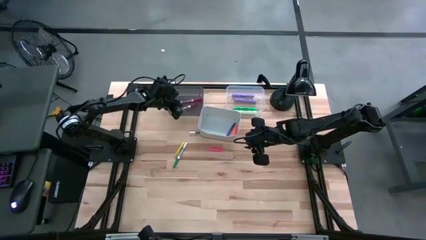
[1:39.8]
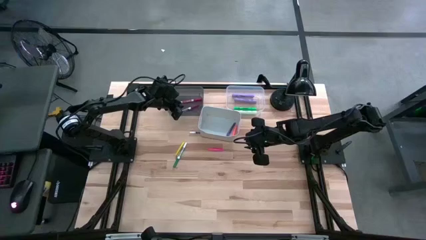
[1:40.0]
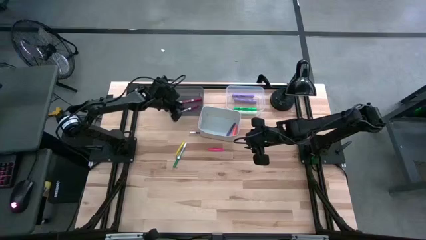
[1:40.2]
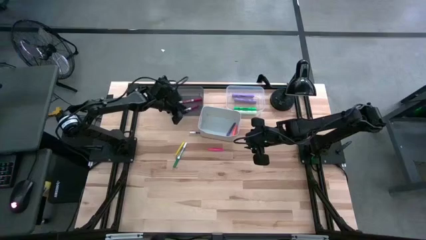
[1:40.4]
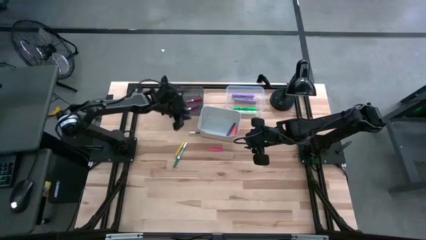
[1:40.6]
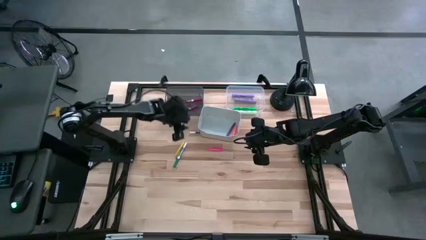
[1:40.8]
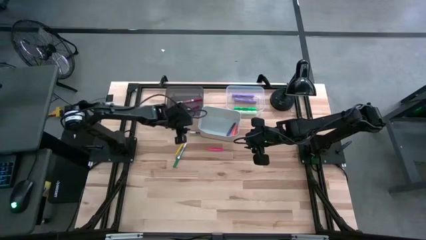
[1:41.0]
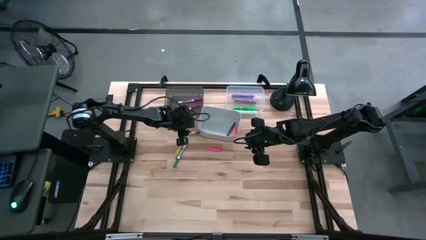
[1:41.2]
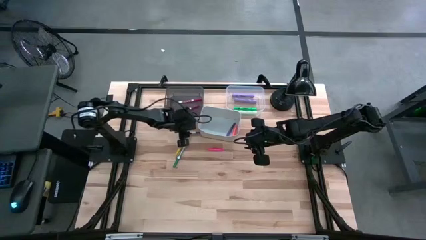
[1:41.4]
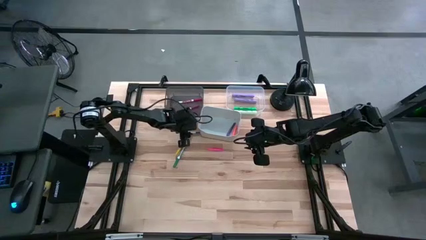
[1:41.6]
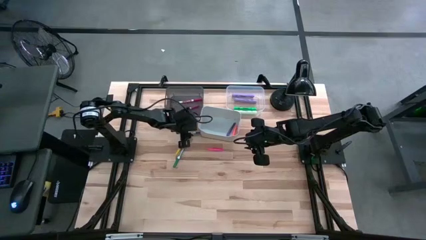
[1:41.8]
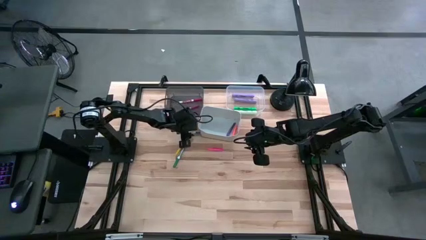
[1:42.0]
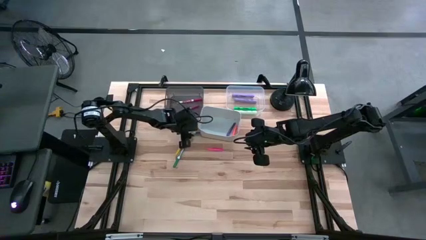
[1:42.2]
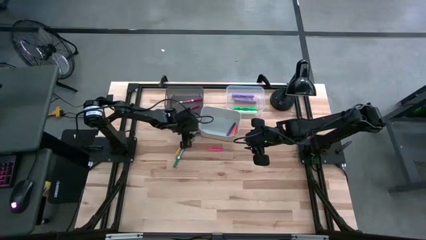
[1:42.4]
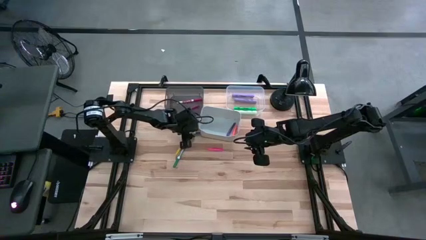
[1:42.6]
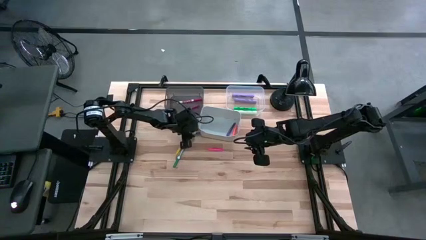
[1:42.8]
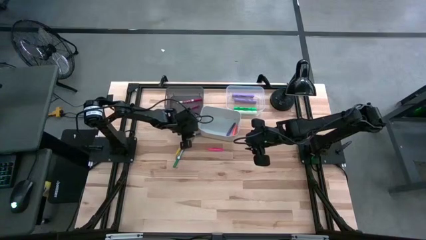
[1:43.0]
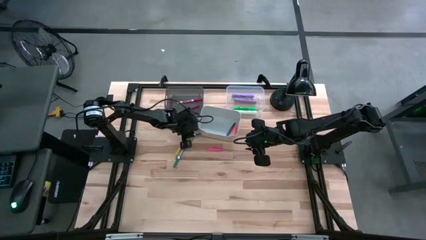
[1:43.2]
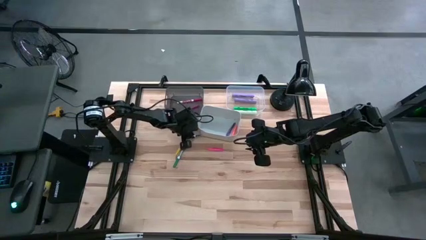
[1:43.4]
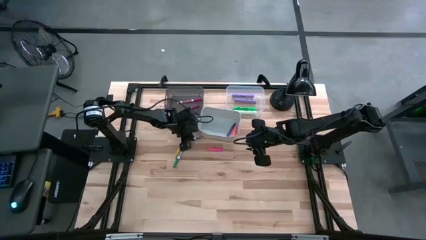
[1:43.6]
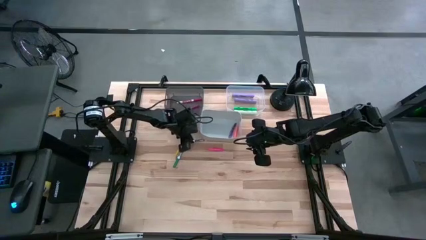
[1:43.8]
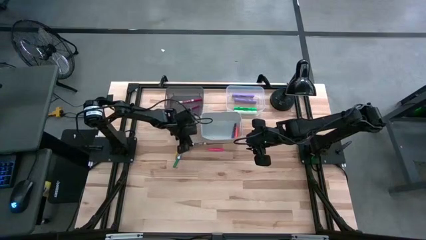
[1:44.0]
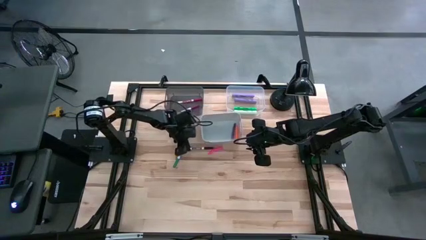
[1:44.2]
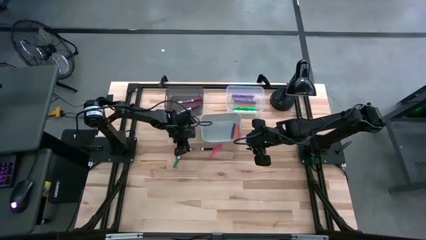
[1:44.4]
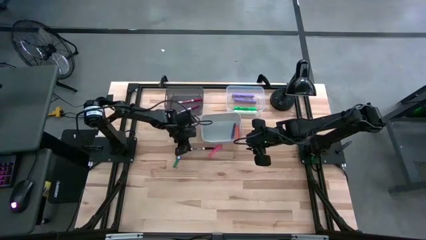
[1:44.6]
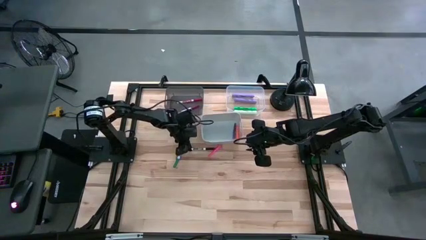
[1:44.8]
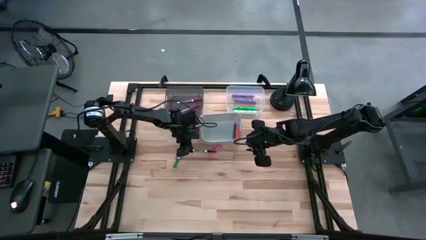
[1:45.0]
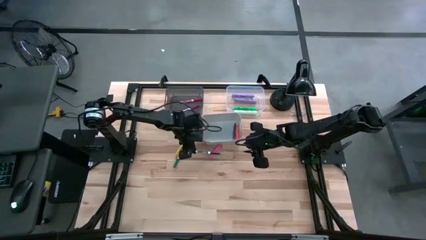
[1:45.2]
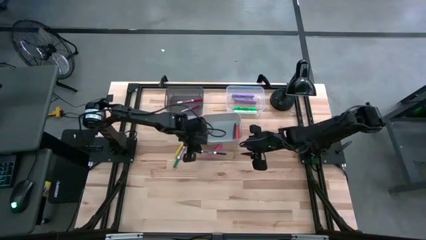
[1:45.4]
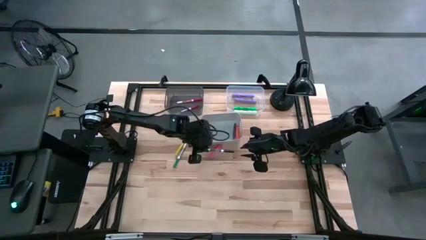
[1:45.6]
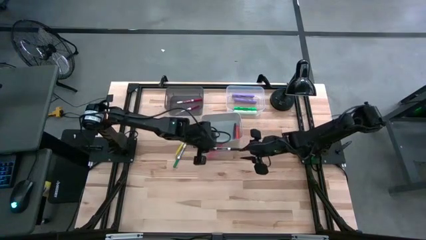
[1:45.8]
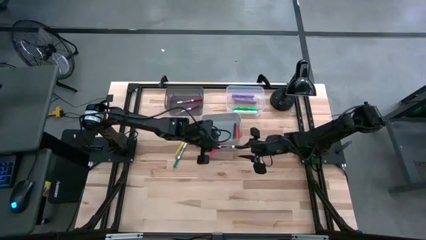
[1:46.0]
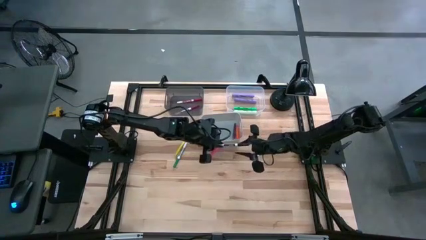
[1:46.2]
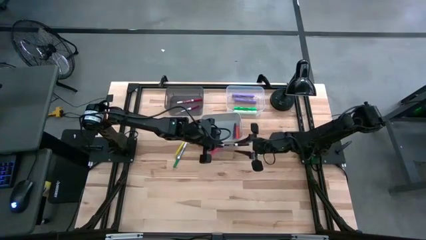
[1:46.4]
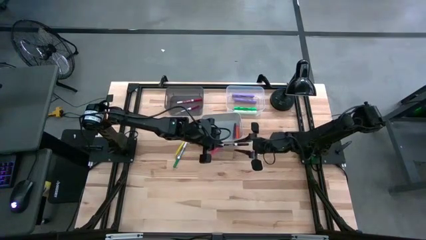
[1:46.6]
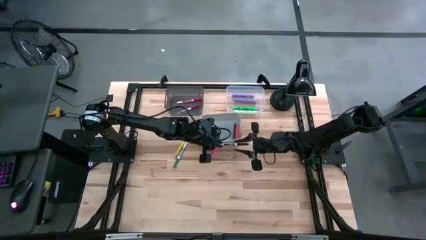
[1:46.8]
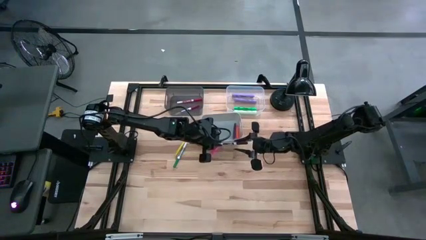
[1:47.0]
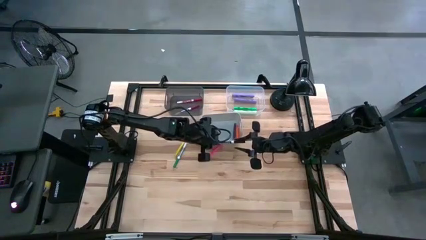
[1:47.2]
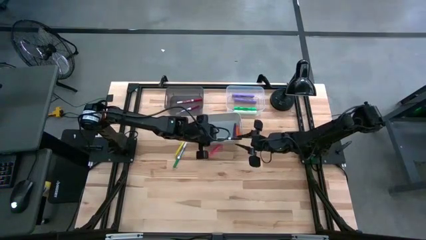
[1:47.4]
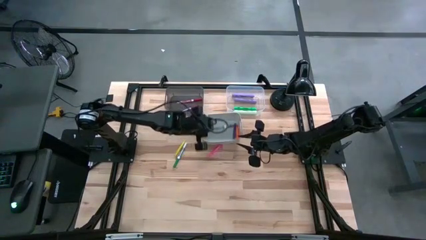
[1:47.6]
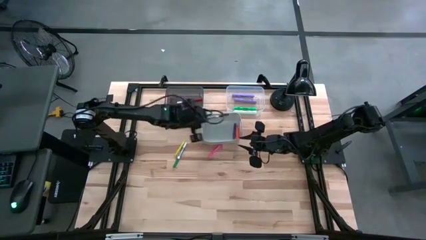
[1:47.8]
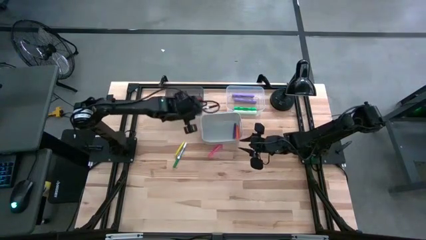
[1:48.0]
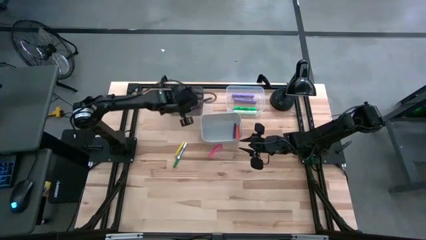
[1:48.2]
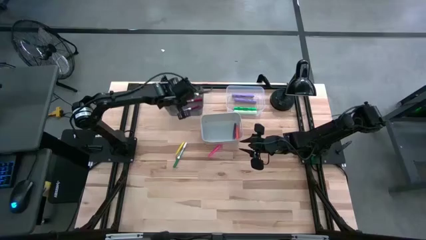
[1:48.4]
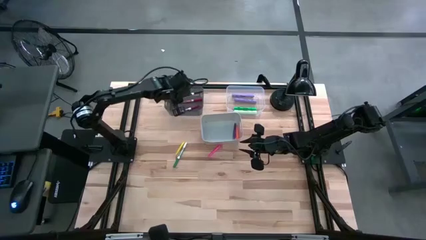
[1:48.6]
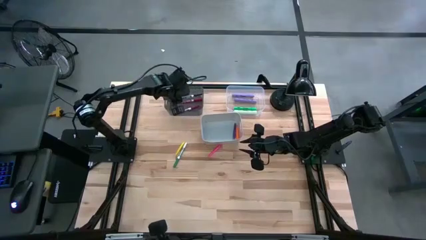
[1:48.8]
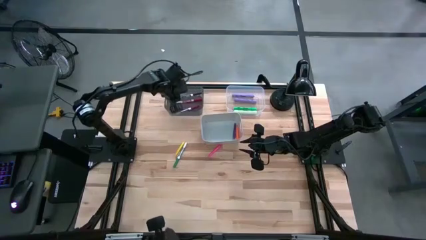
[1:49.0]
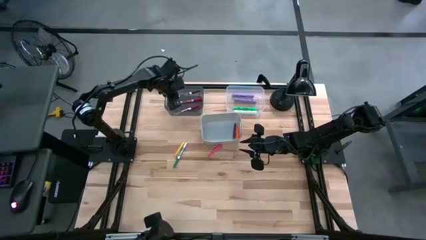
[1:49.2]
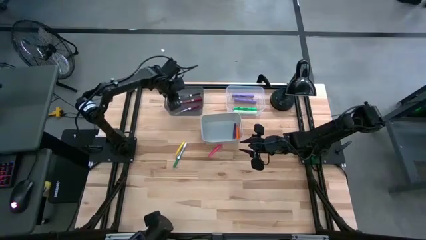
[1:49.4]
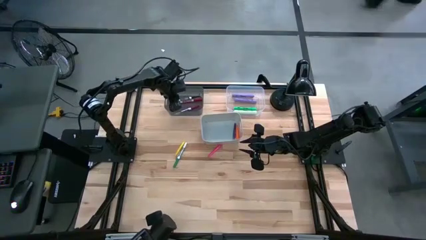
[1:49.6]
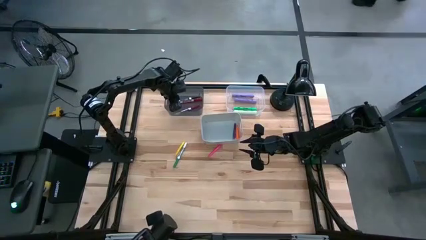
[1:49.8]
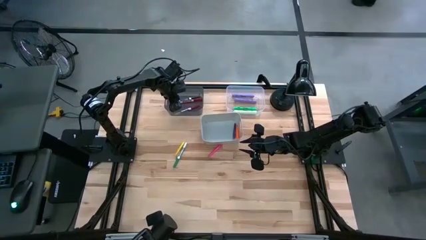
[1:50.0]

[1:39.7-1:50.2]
Task: Pick & Place Markers
Put the black marker into the black bin

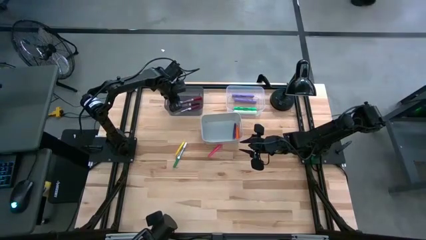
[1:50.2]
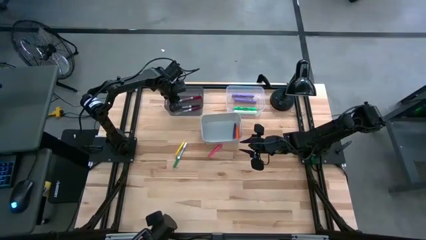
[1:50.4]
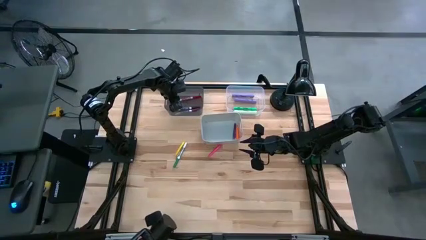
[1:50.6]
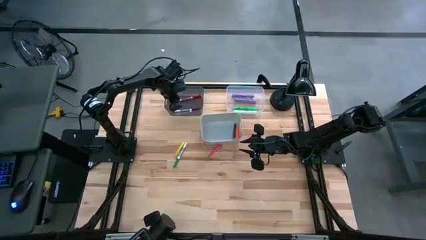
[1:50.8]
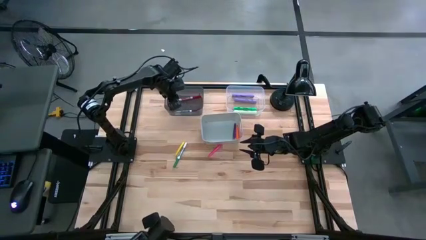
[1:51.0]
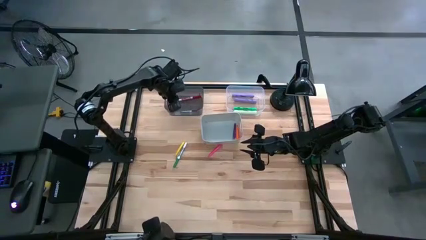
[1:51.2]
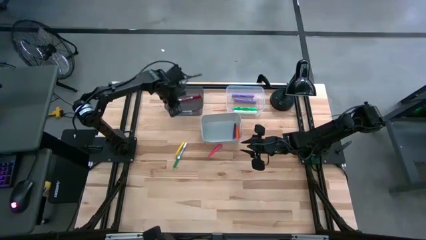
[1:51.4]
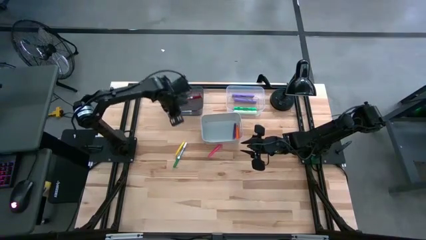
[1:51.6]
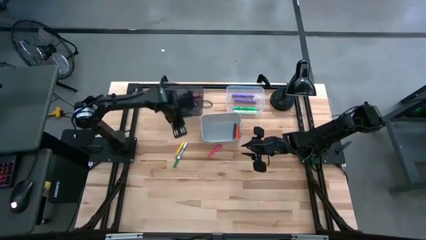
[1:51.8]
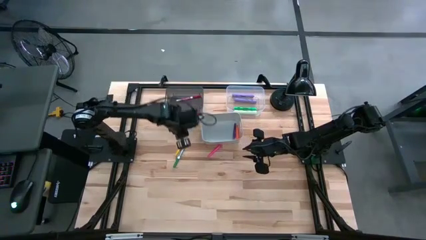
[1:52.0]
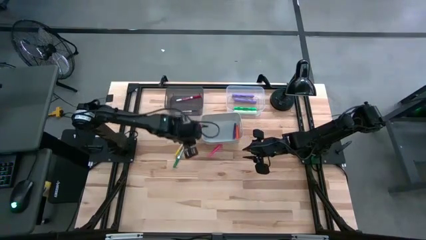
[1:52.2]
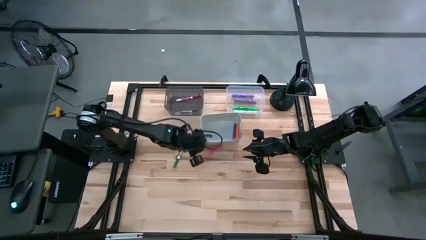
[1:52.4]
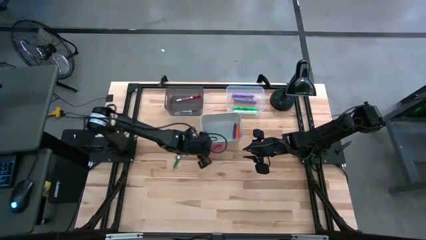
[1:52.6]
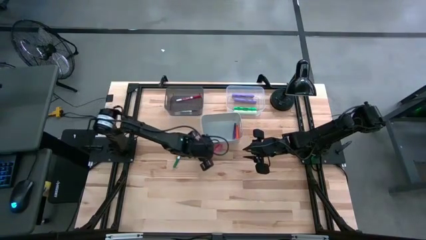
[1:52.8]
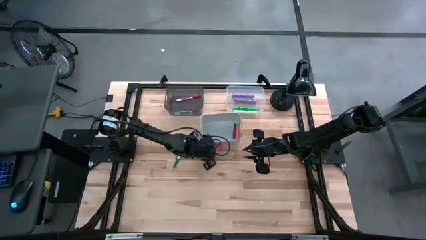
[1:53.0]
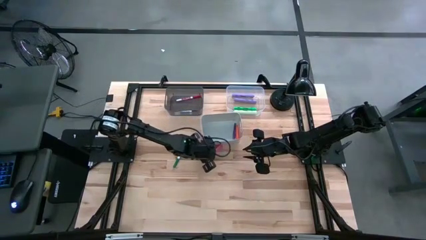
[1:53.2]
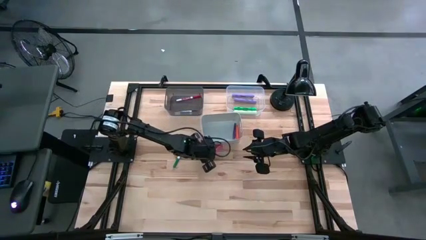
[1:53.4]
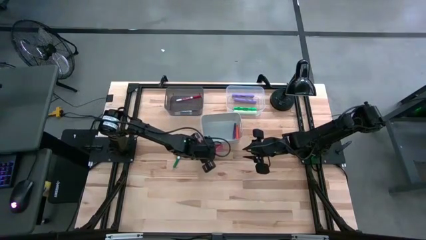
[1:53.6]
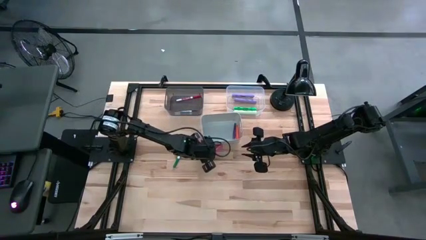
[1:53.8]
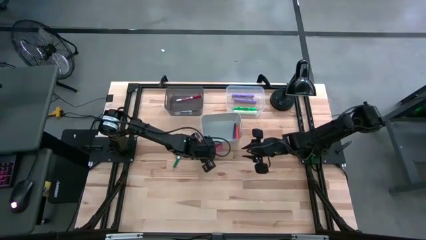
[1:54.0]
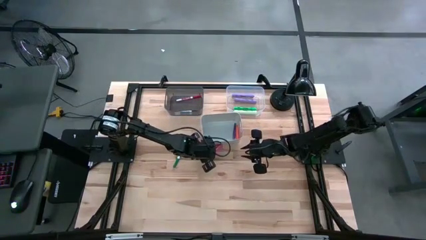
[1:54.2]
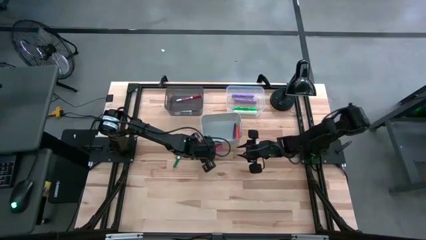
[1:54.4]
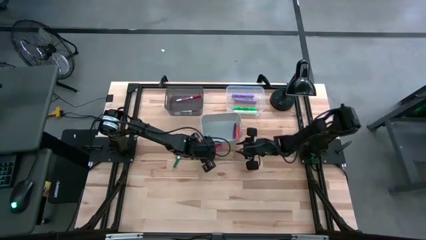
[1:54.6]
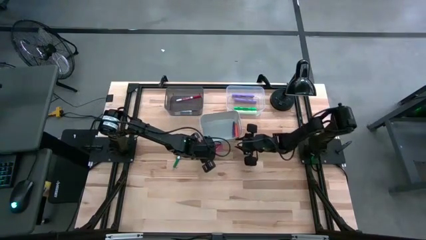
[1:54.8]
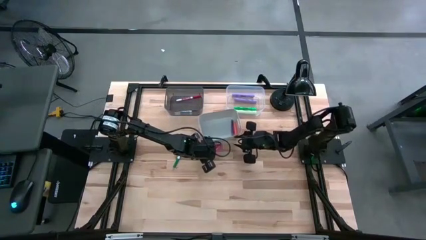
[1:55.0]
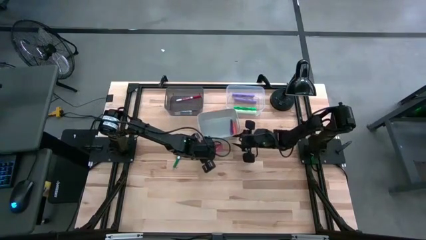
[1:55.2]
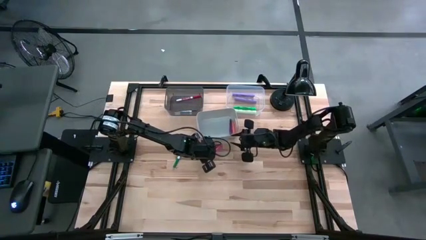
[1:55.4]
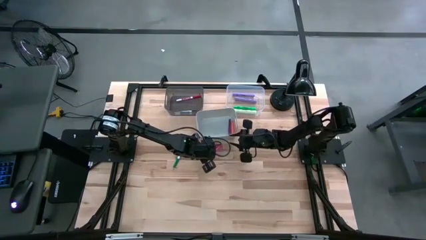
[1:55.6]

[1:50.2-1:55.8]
Adjust the gray bin

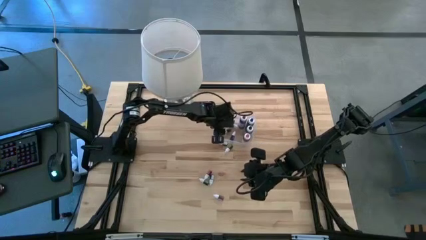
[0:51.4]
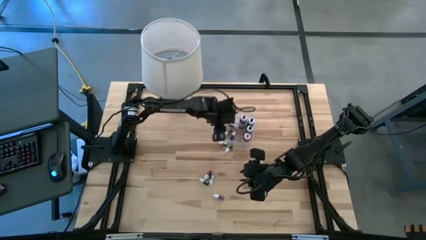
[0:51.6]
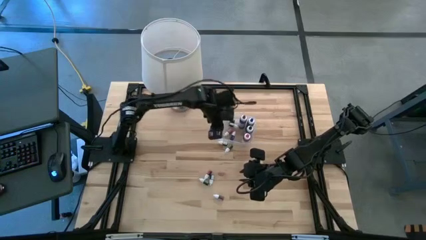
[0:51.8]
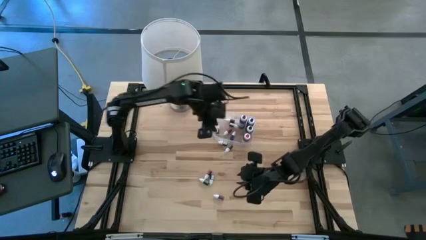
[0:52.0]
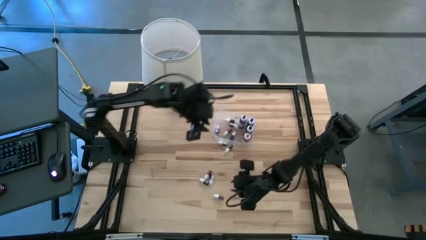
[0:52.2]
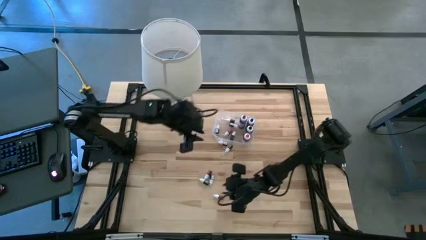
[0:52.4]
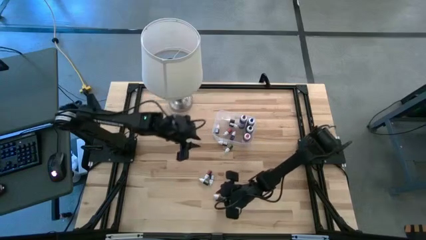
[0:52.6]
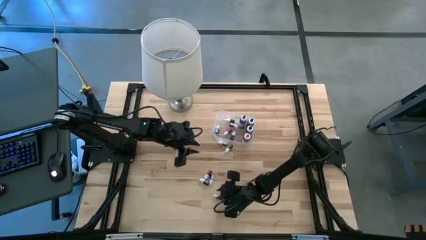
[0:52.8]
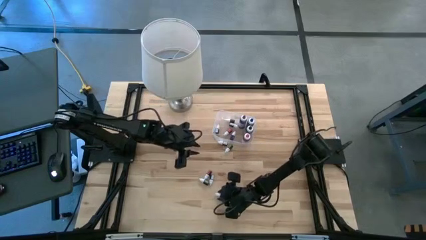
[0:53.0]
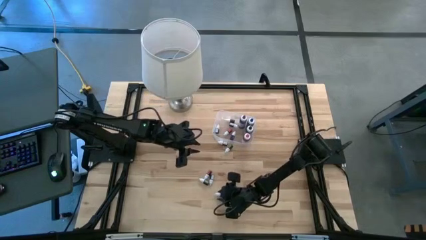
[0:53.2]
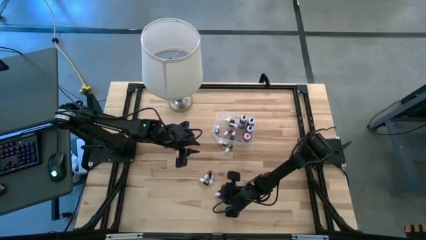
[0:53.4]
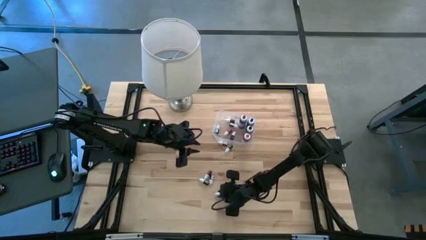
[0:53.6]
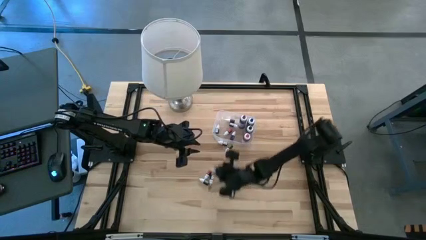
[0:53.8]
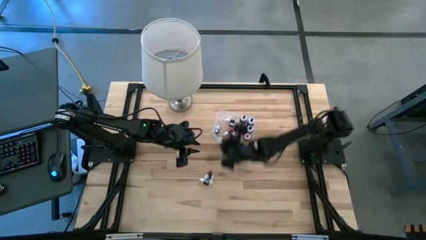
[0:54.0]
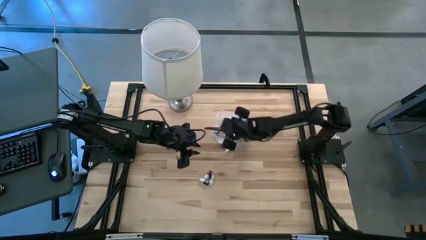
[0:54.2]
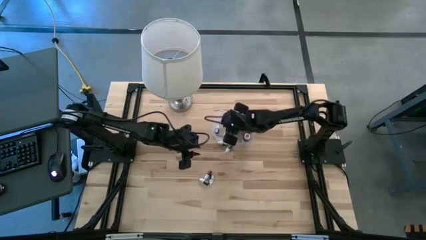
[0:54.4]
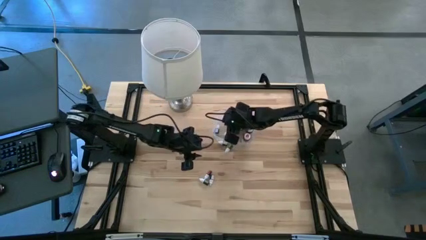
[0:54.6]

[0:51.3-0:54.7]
Task: Pick & Place food coloring
Put the small orange food coloring bottle into the transparent bin
